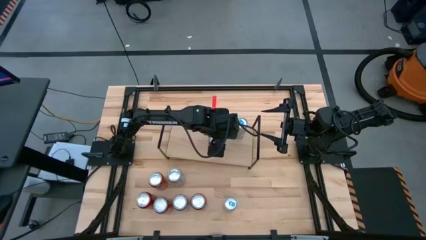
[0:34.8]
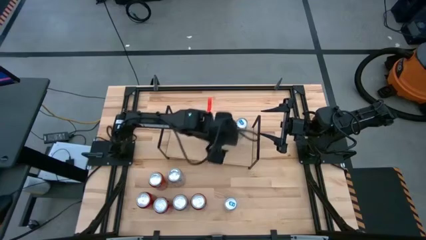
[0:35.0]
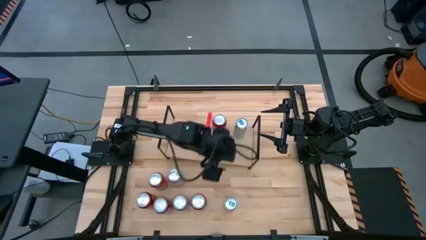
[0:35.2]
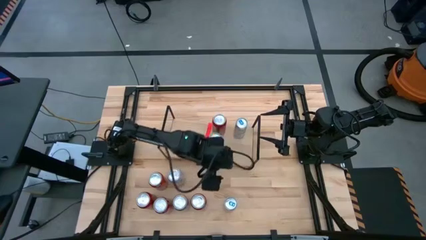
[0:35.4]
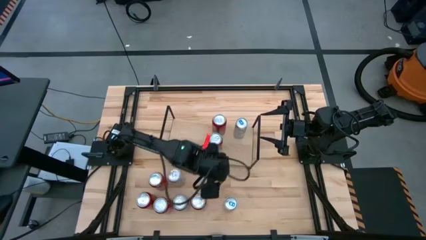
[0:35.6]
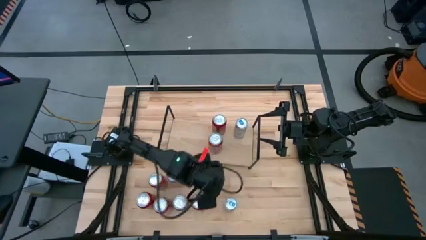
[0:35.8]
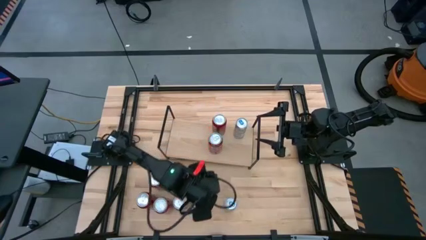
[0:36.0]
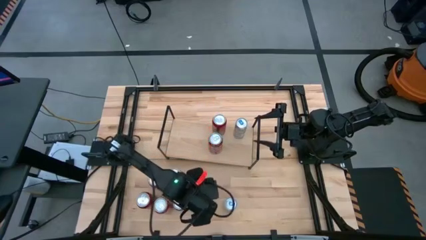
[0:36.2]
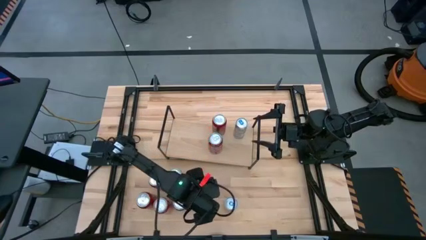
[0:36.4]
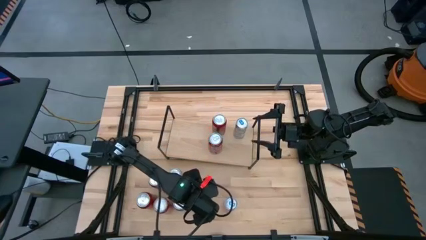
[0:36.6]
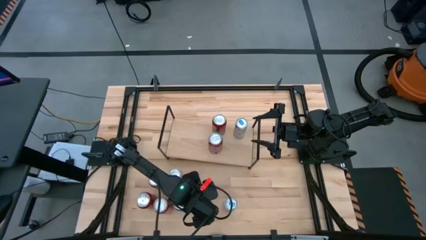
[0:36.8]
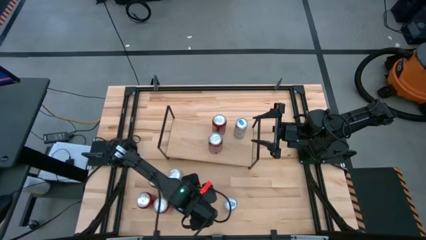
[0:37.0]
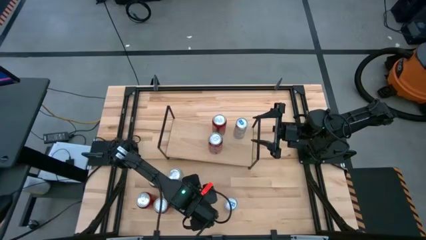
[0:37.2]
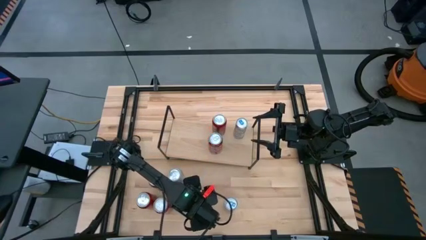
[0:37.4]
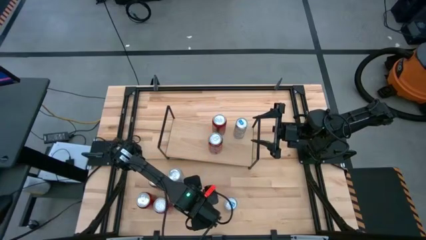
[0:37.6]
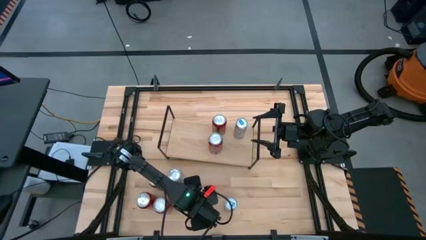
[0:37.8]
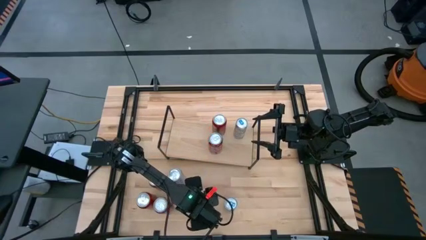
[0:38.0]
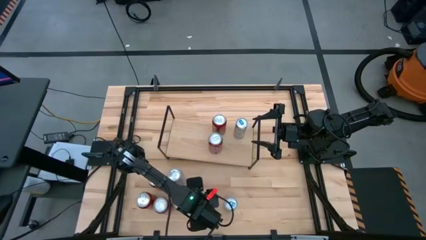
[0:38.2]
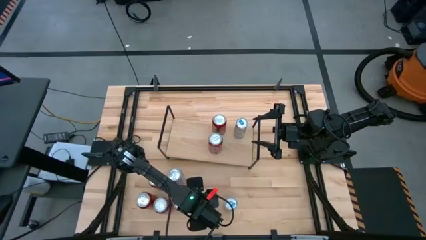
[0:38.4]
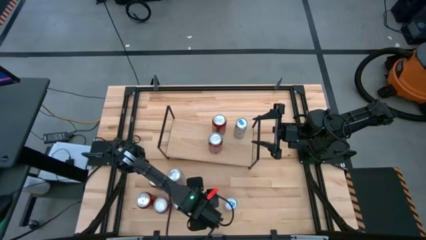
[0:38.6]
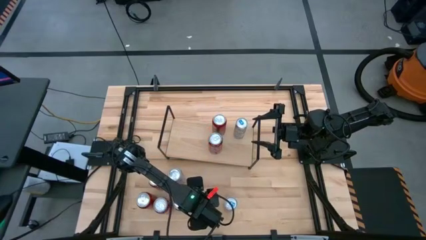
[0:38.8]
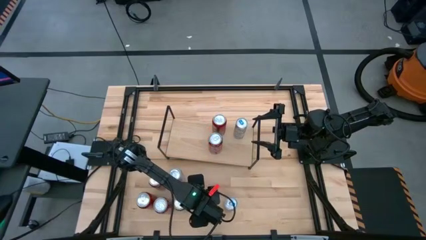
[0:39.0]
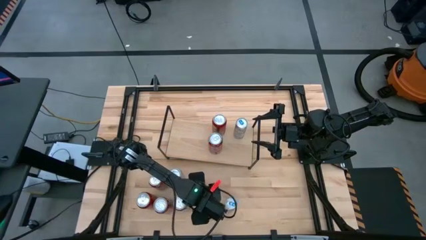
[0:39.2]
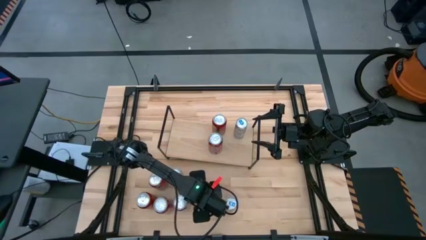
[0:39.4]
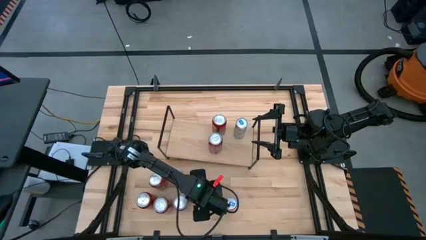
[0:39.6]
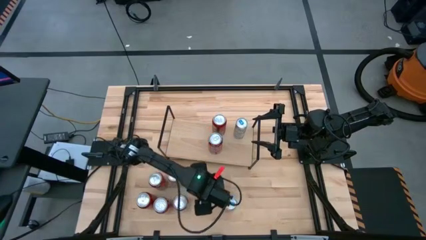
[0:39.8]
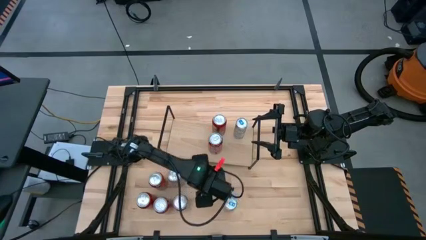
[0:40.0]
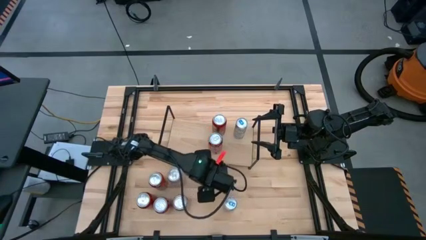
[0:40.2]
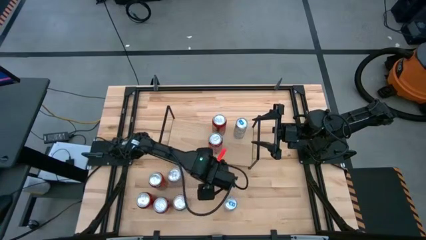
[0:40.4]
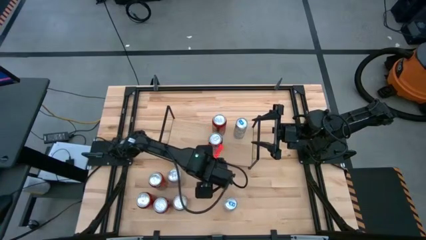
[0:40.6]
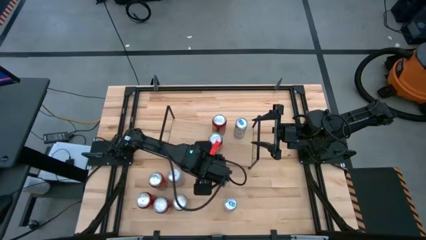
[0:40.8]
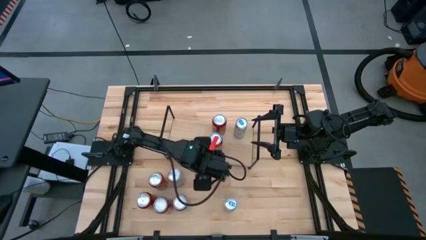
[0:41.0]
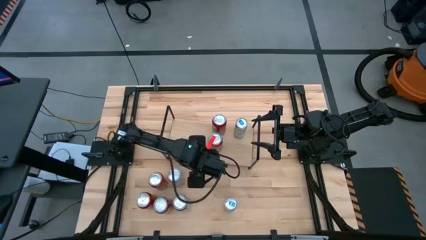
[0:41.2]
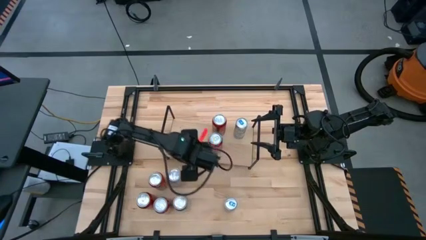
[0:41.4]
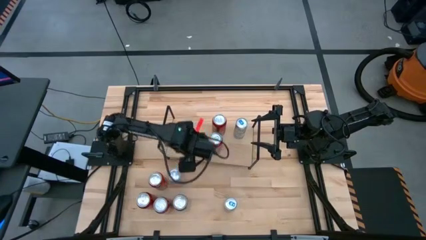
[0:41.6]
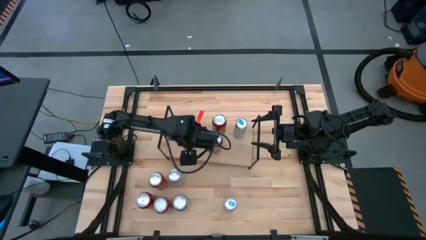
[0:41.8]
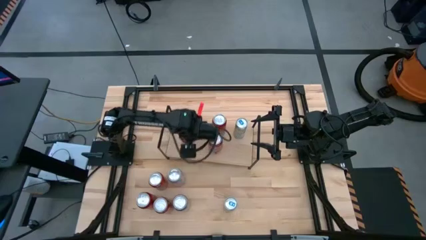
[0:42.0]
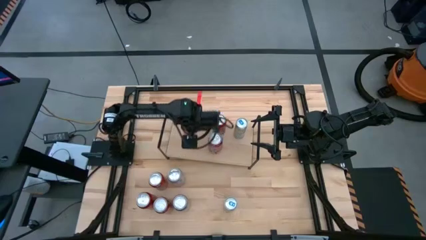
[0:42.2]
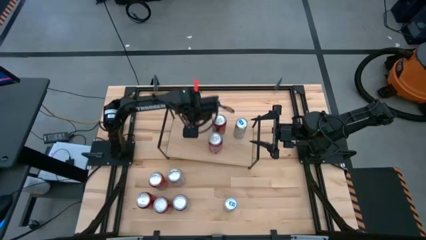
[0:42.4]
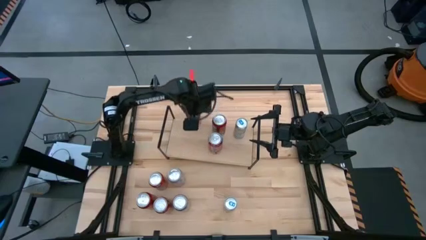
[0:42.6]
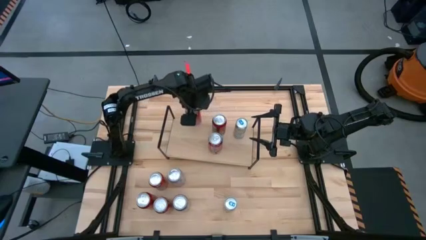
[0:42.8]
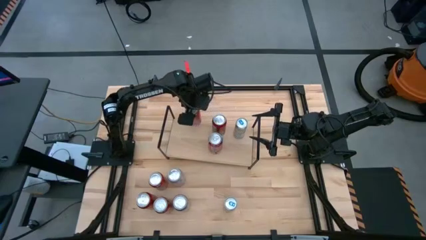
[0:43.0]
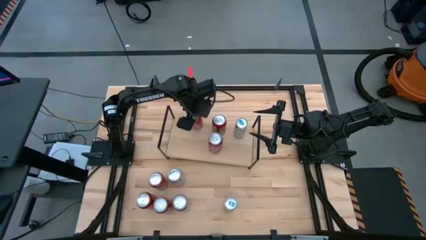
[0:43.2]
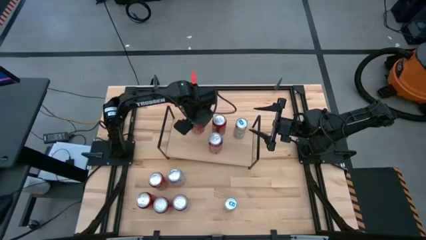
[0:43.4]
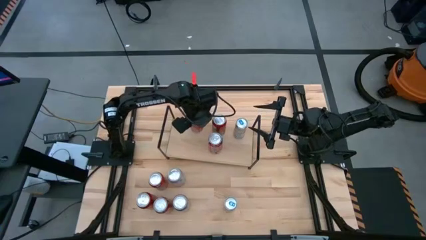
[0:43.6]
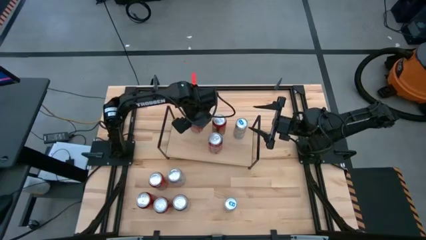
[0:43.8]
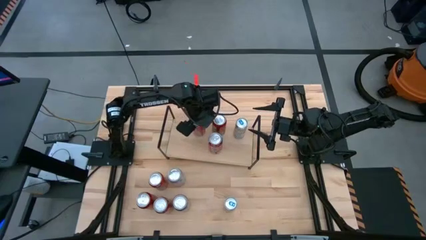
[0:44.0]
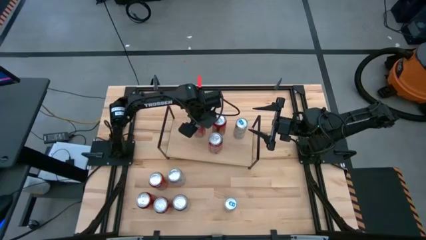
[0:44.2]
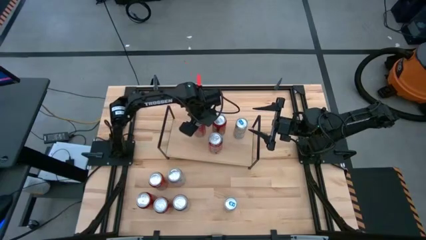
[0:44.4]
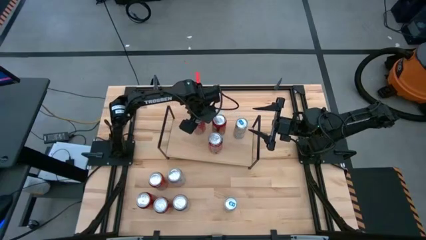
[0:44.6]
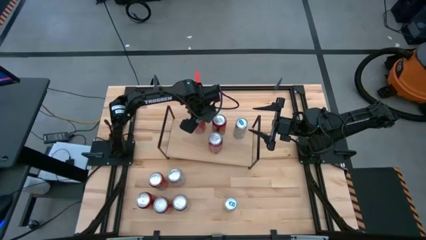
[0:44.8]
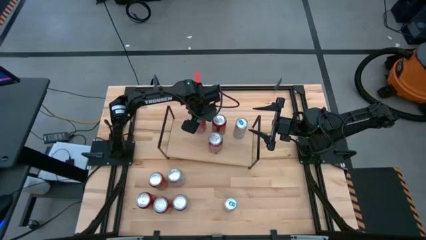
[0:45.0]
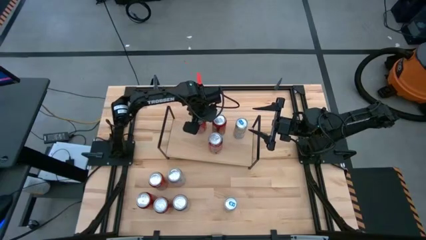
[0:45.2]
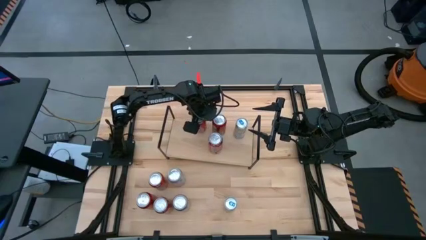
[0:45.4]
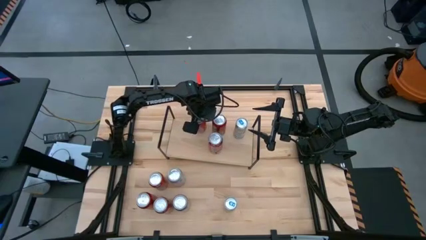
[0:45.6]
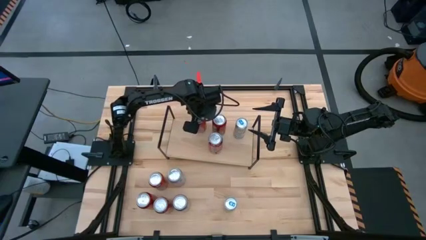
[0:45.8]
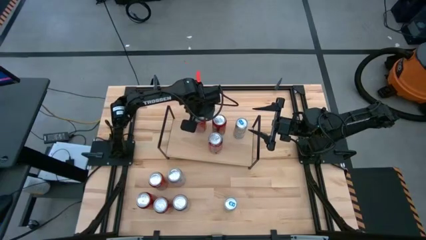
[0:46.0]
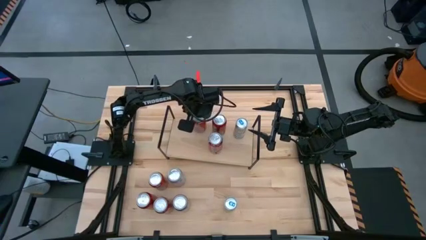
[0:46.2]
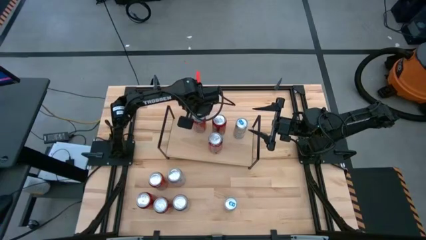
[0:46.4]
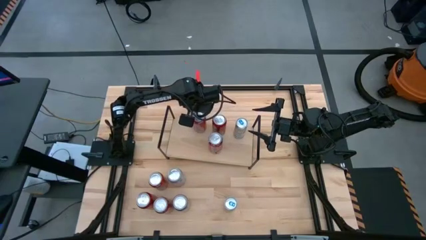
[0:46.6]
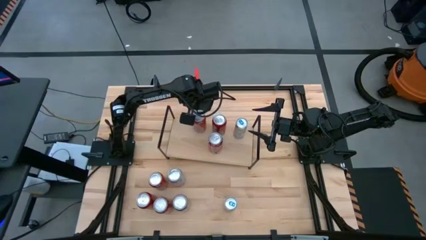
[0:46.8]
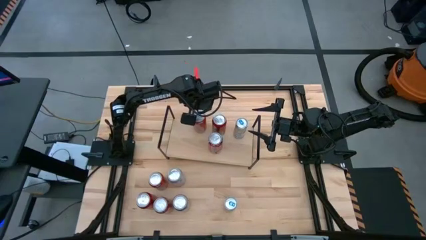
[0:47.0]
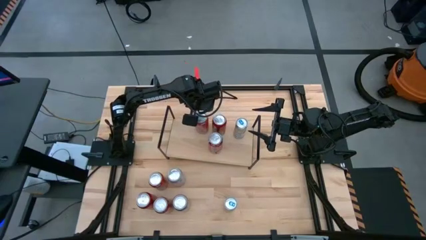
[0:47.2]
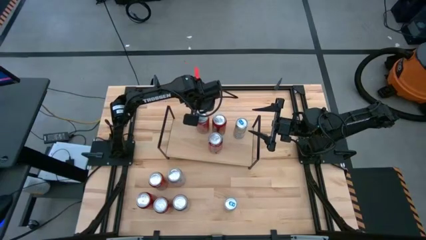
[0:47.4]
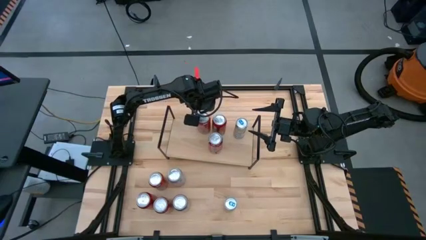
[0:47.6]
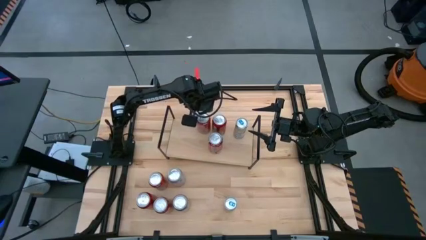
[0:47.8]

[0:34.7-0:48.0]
Task: Place canned beverage on shelf
Put the right red soda can on the shelf
